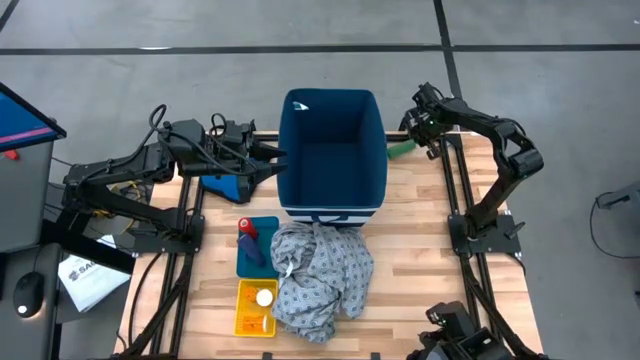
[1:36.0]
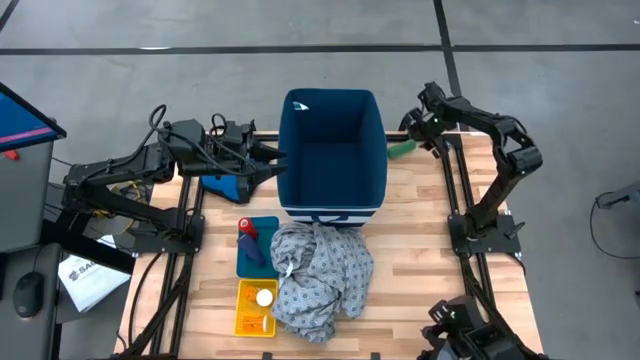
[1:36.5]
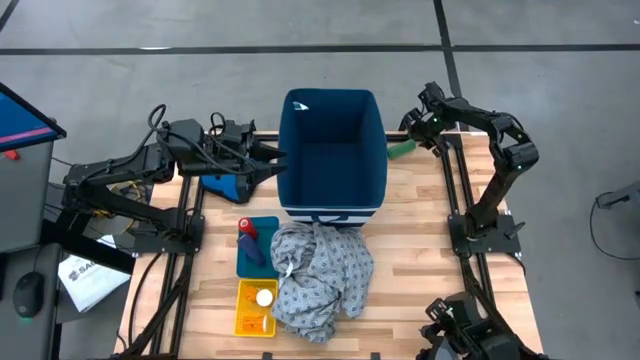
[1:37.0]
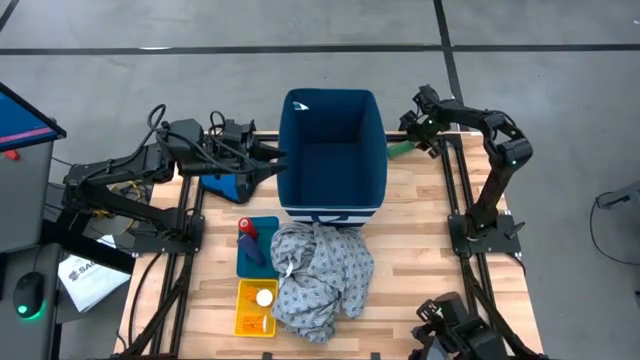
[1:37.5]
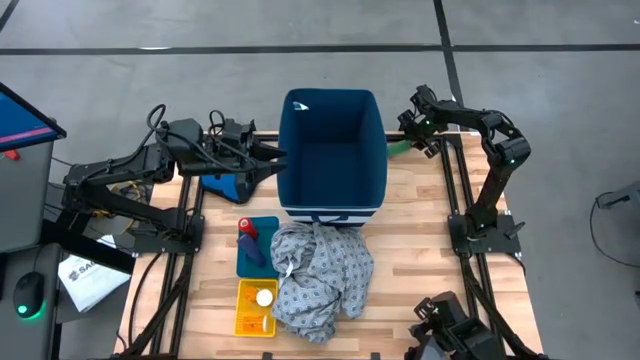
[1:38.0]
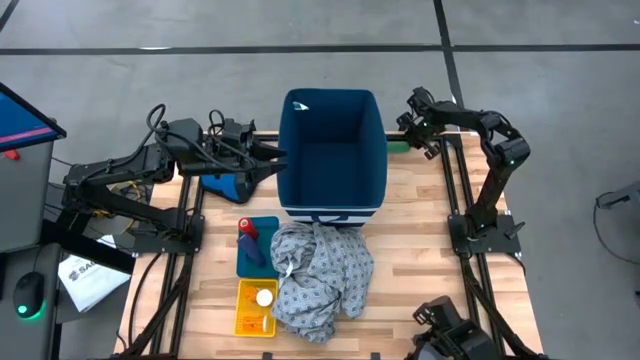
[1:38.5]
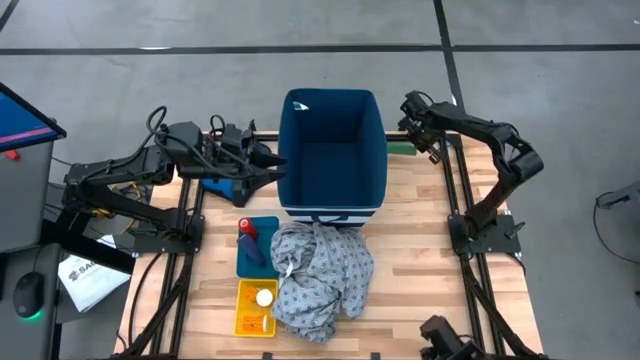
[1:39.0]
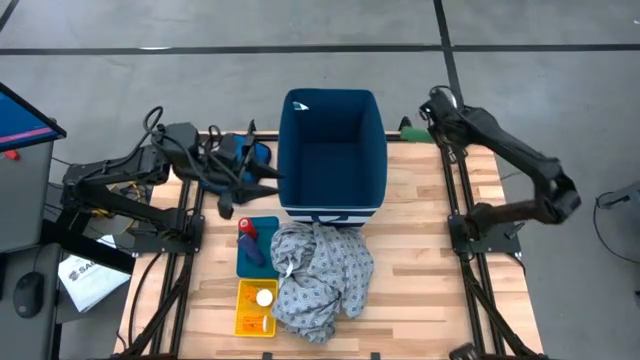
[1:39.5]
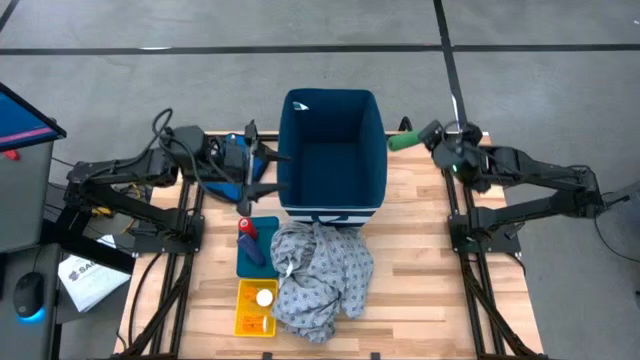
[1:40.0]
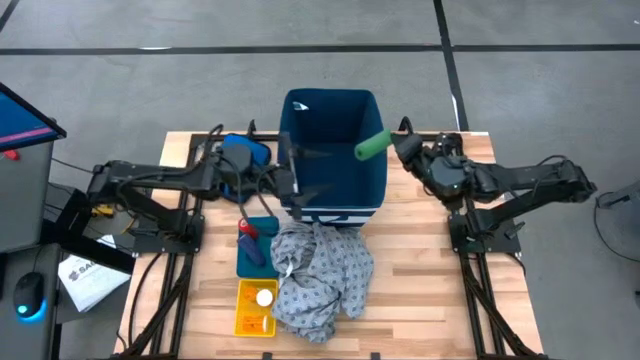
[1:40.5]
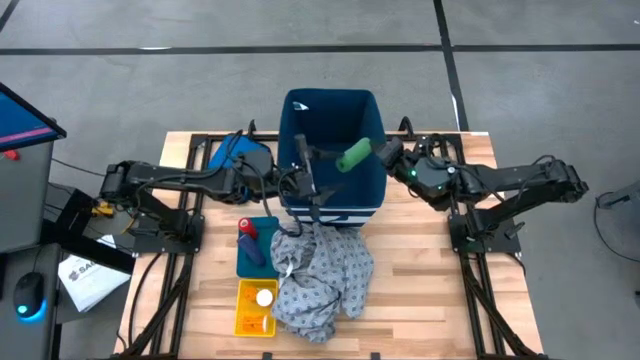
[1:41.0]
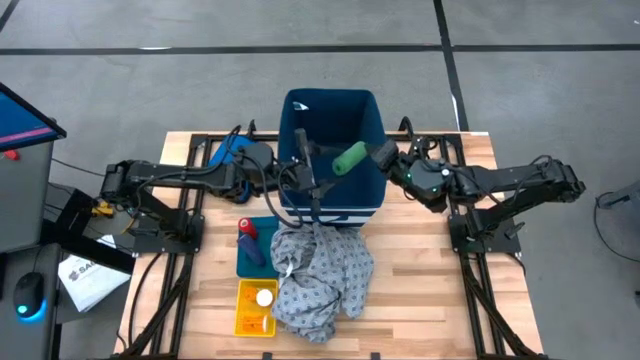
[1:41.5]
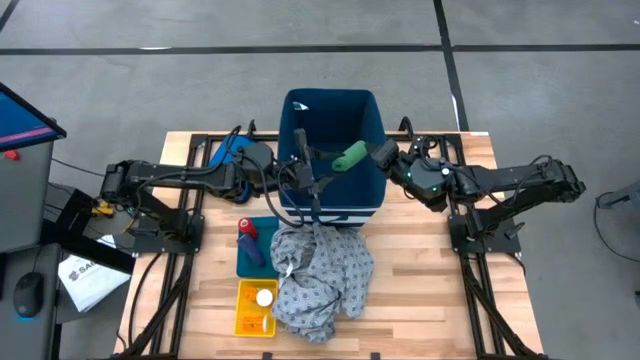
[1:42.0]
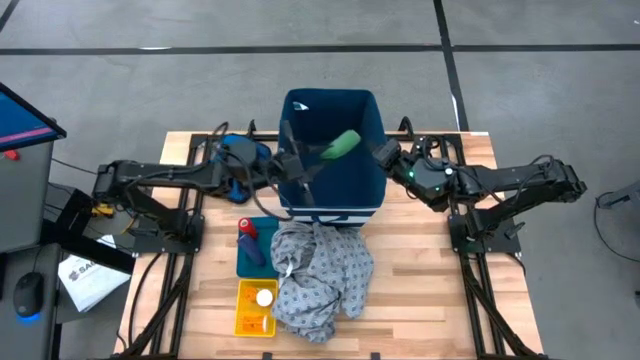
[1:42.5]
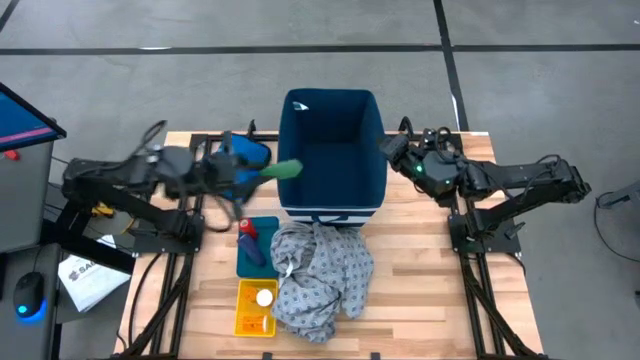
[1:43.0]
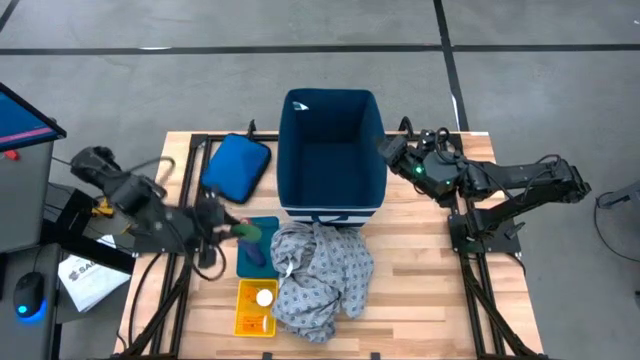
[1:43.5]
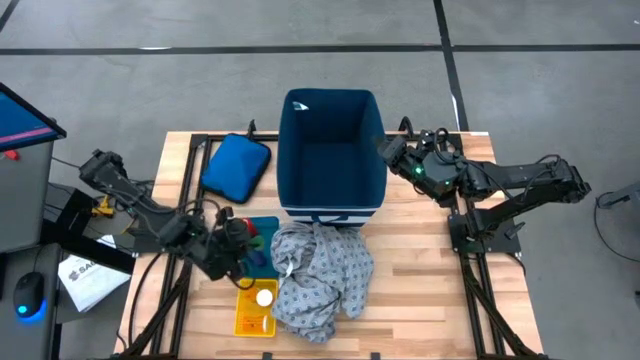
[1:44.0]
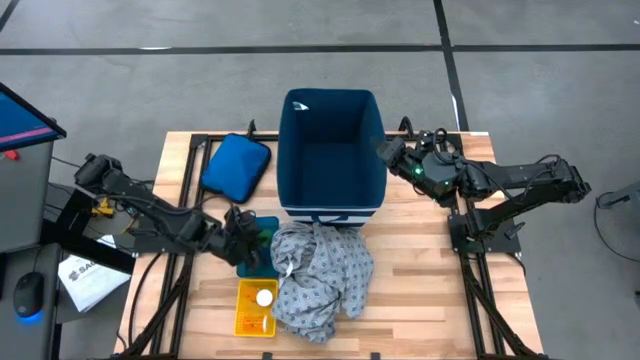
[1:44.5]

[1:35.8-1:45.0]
Task: Pick & place medical supplies in basket/bin
Put the green bandage into the blue bin

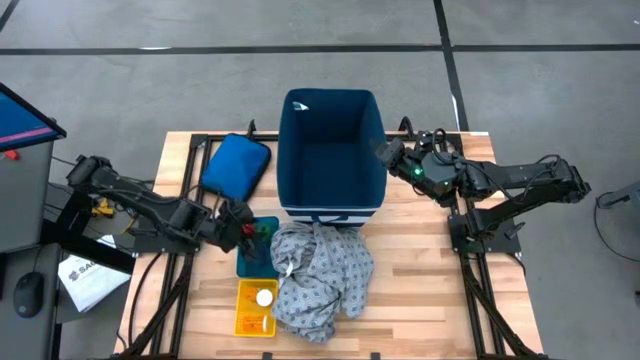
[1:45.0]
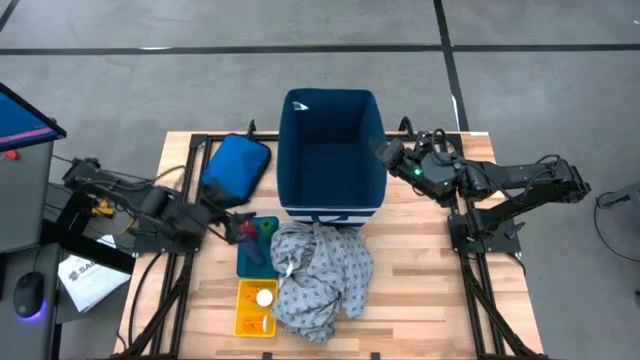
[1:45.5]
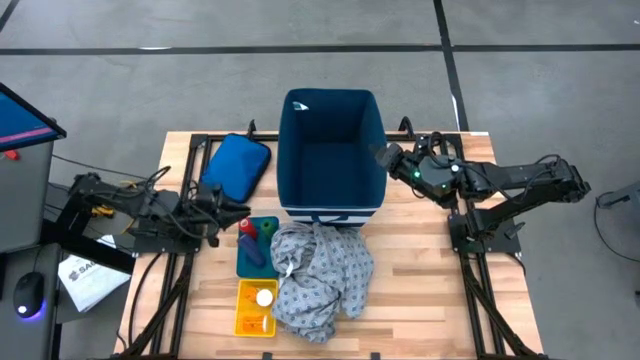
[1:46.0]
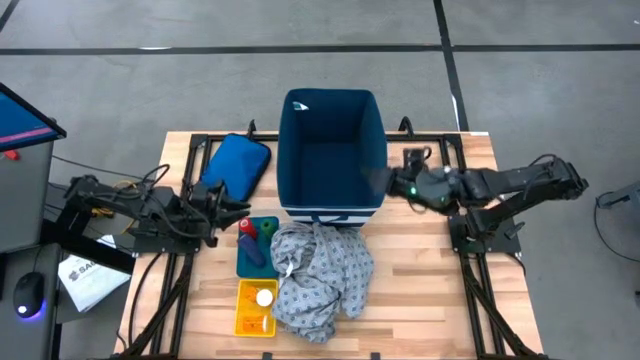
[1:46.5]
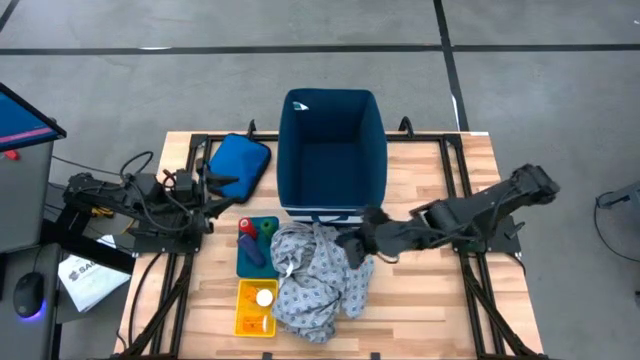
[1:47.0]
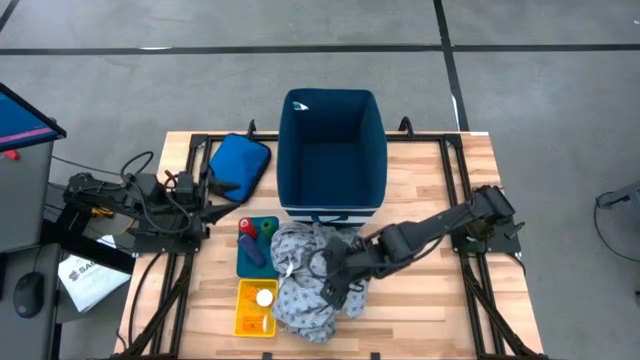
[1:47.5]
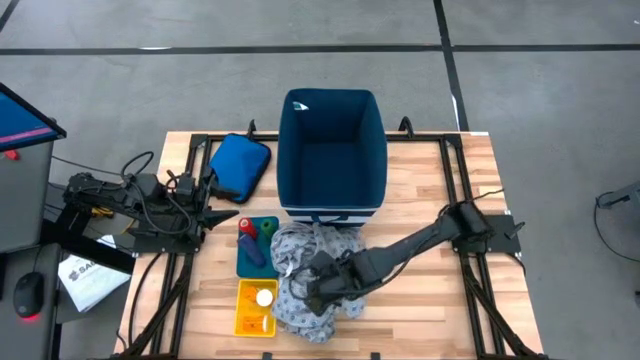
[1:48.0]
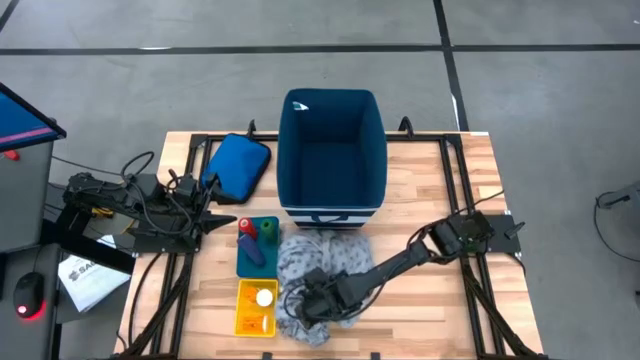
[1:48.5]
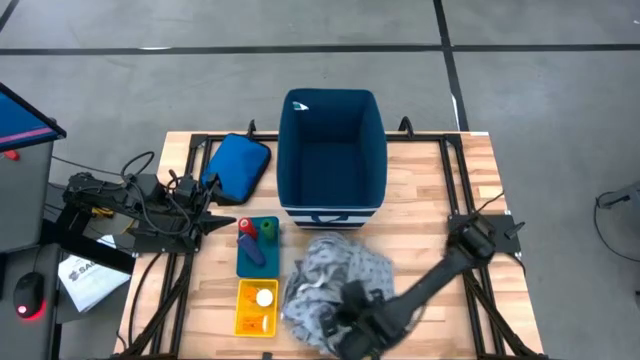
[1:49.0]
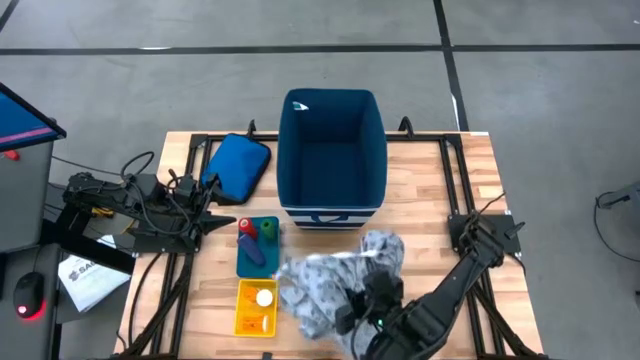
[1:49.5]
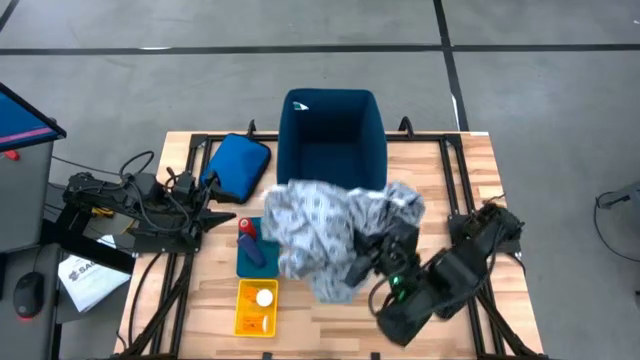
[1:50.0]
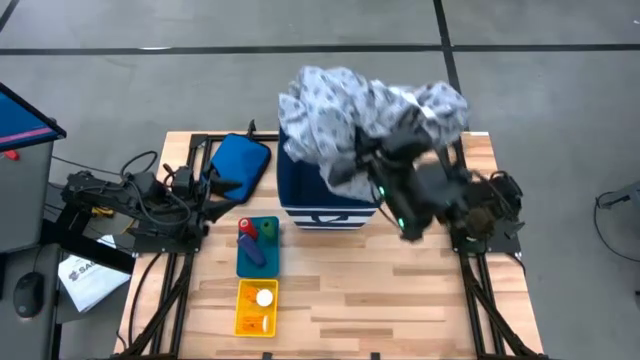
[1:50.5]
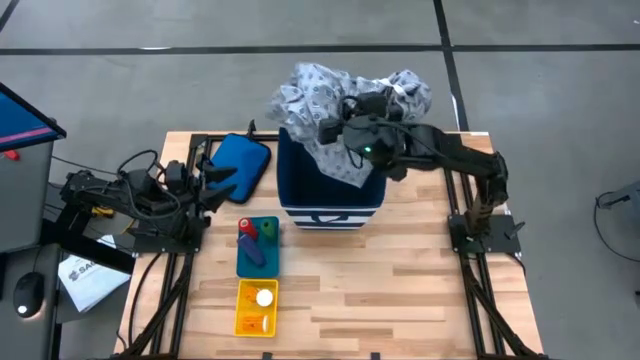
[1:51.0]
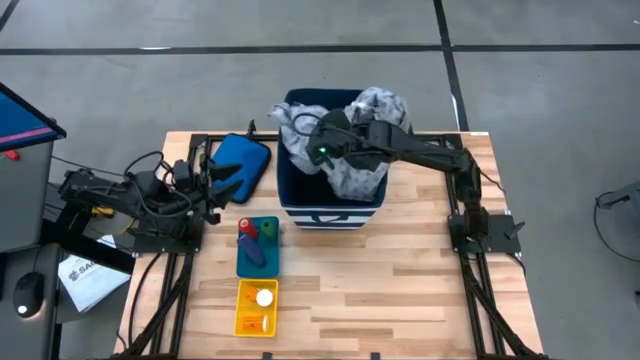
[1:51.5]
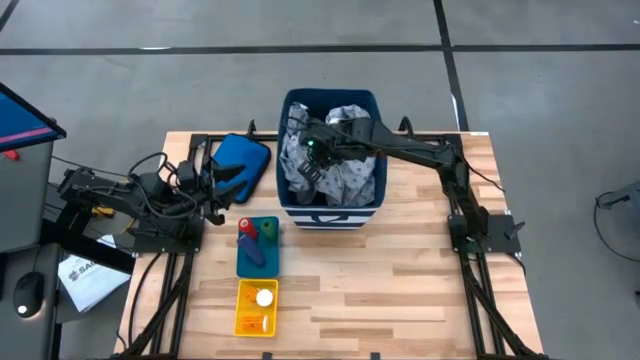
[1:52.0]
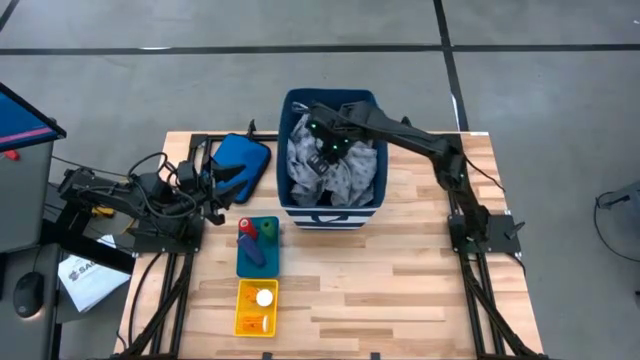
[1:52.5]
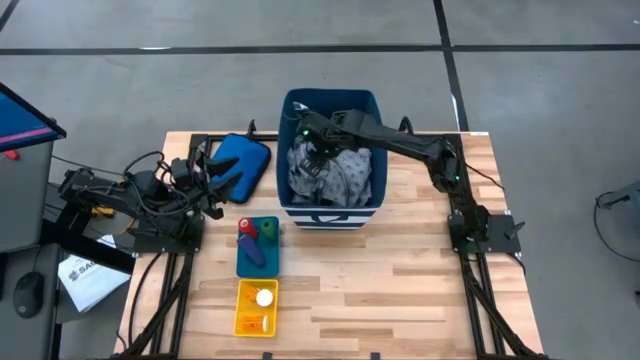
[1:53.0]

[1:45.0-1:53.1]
Put the patient gown into the blue organizer bin

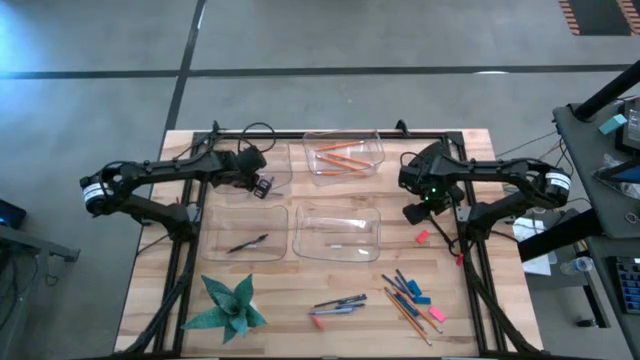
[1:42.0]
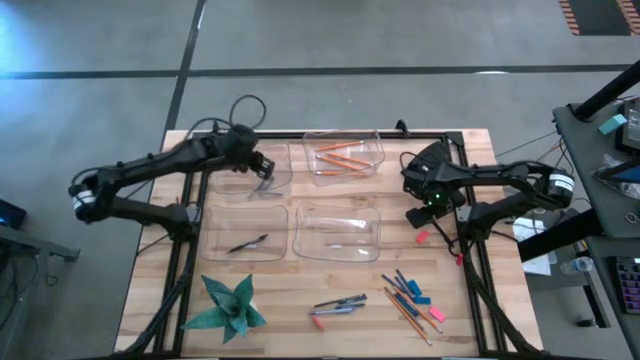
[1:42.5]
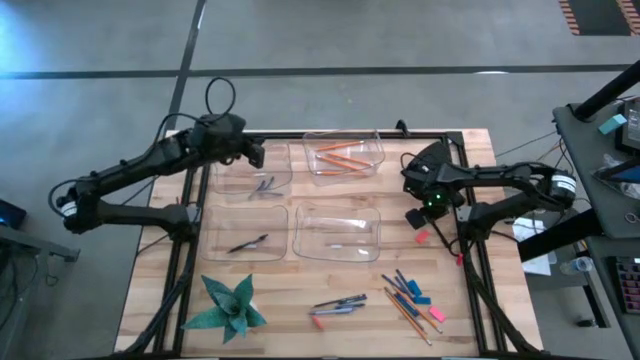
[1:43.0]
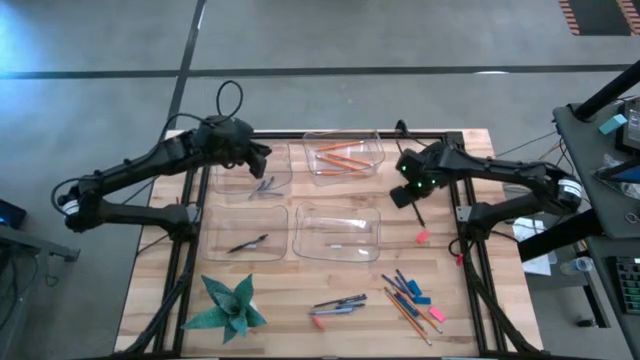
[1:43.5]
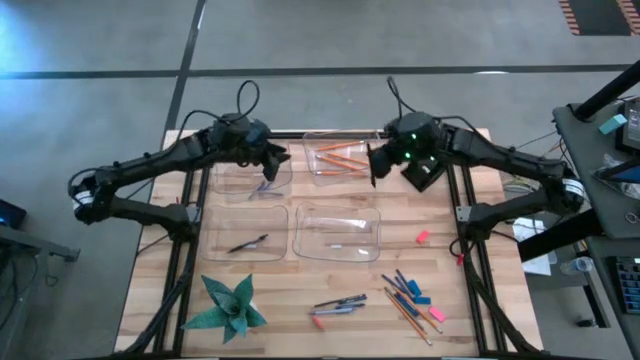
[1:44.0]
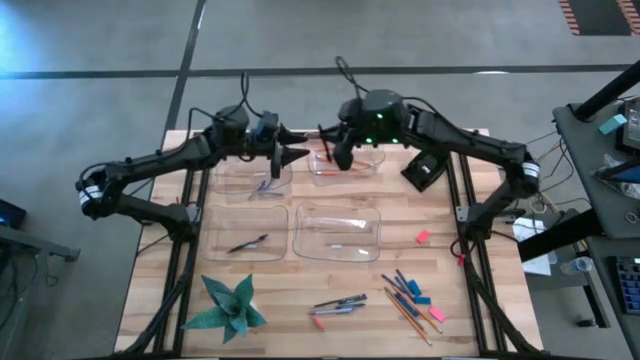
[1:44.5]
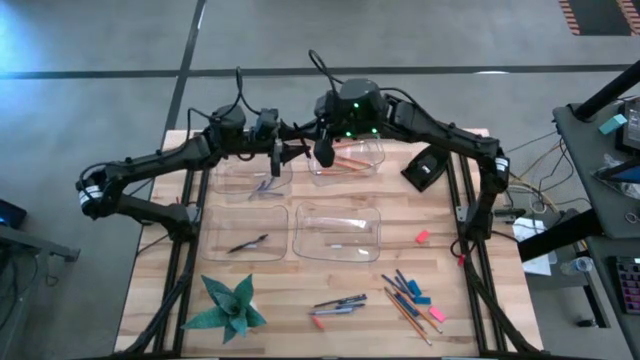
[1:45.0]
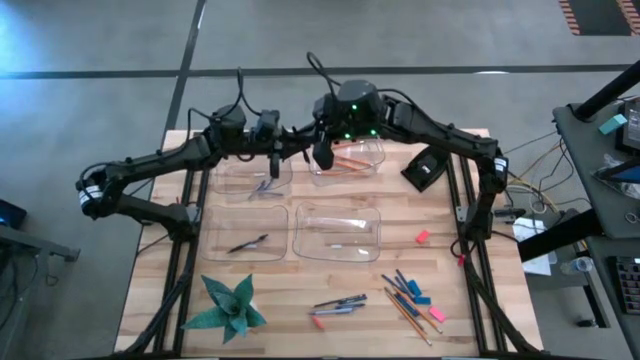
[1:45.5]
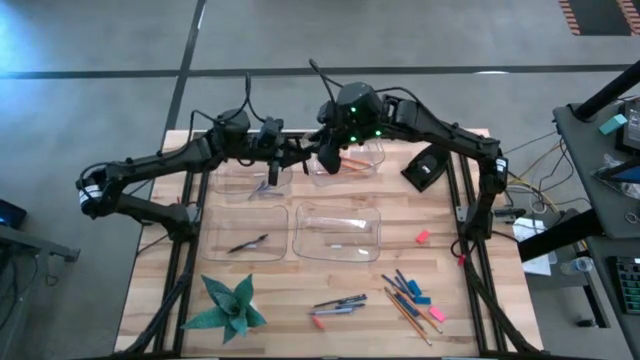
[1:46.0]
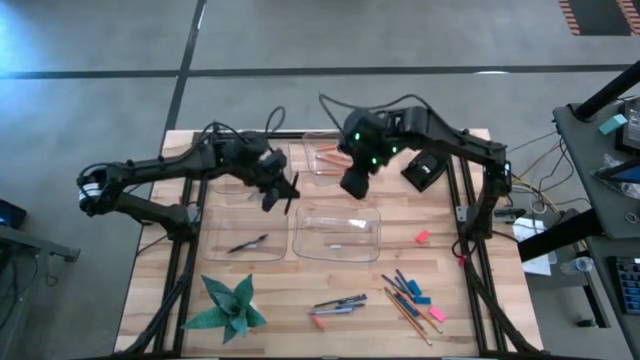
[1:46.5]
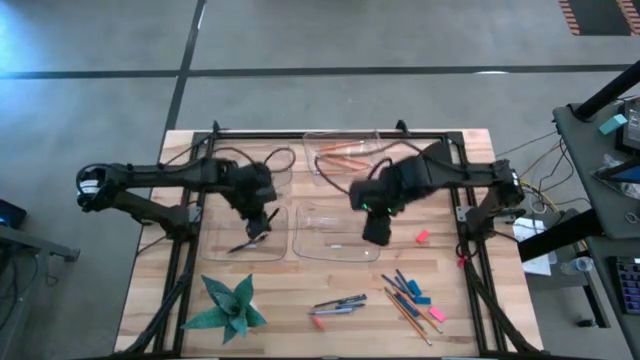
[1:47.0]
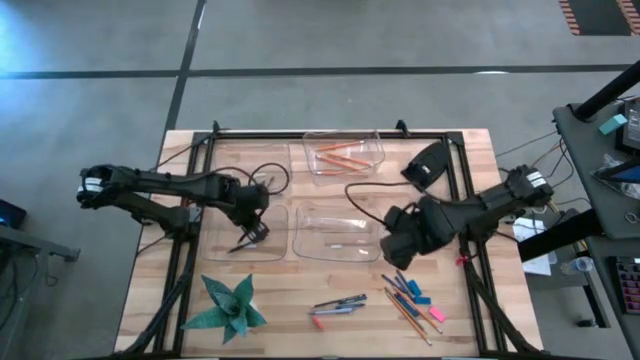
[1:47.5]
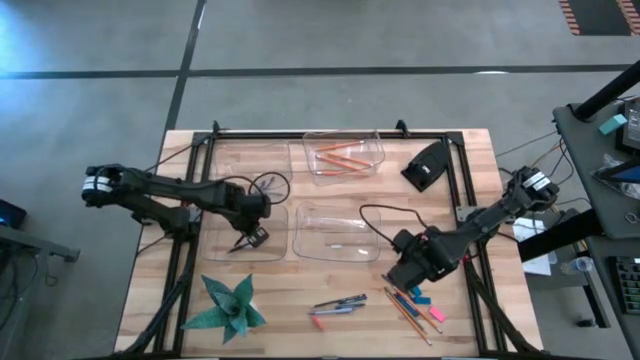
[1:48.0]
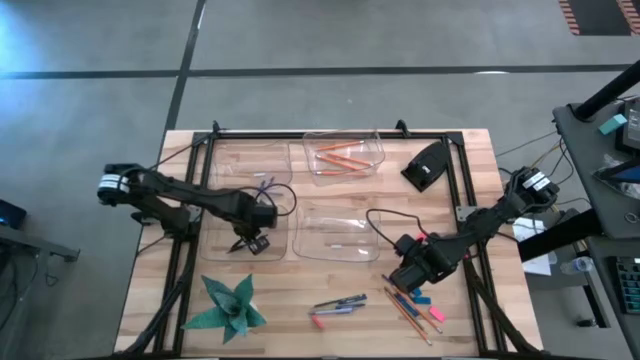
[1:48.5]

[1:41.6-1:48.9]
Task: Sort crayons/erasers/pens/pencils in bins
Put the black pen into the bottom left transparent bin
